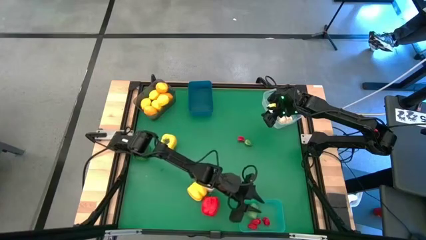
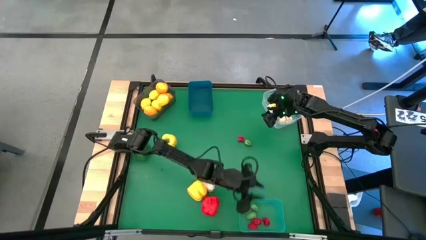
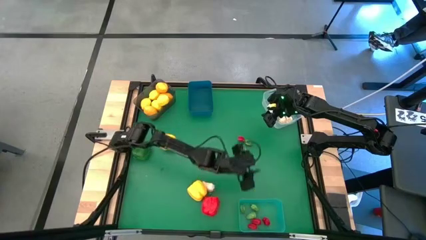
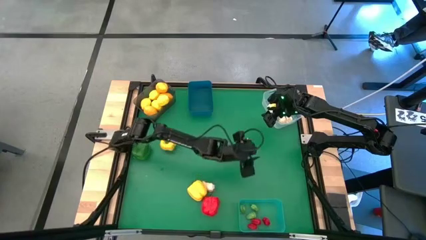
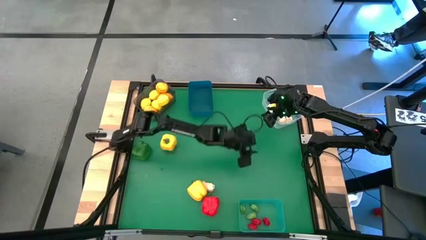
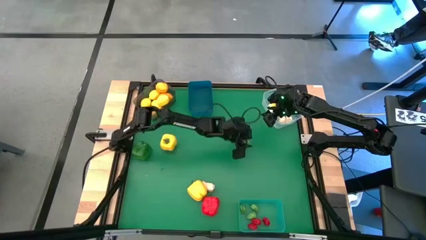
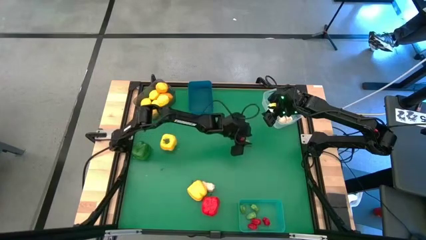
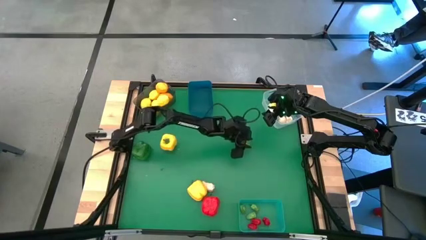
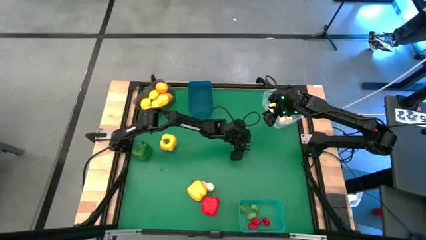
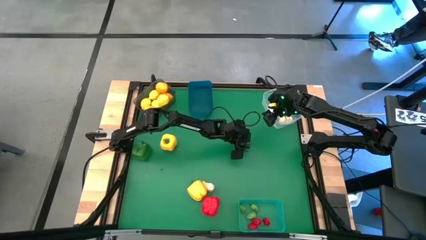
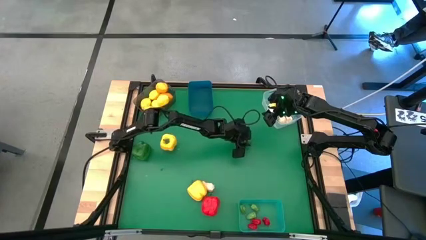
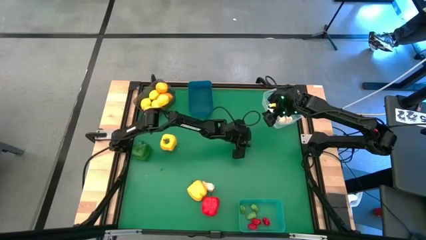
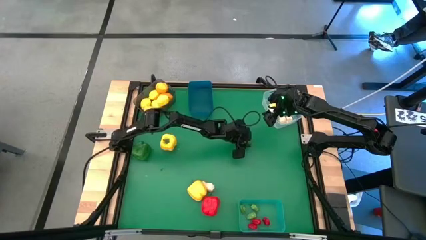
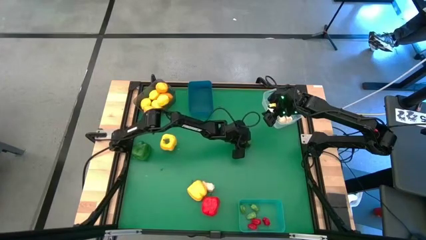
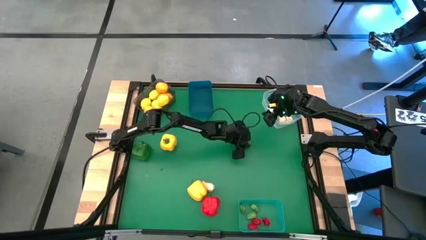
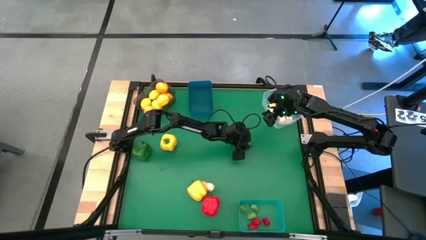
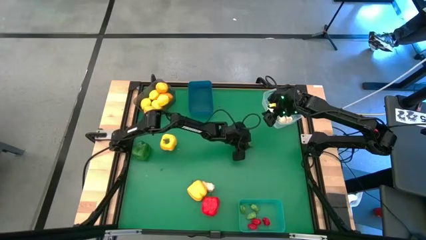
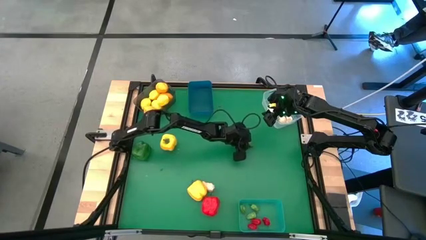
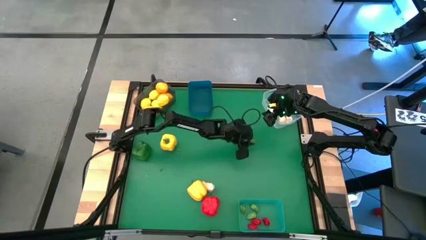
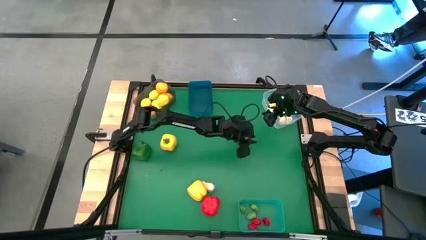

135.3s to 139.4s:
Task: Sort produce into baskets
Put the green pepper into the light blue bin

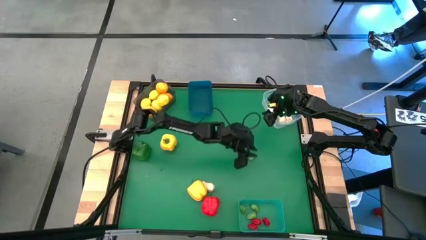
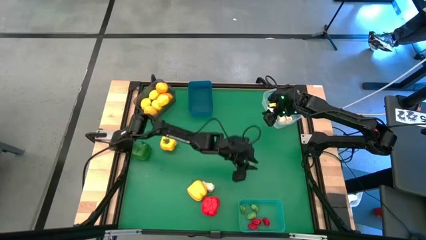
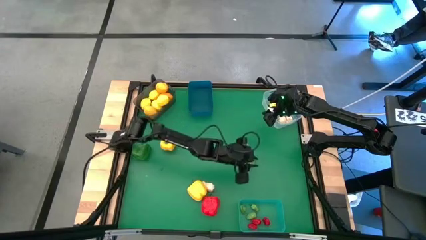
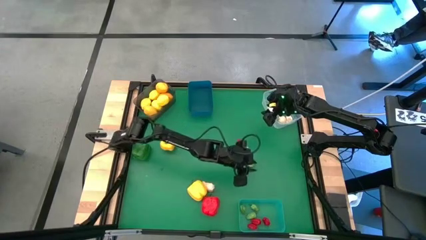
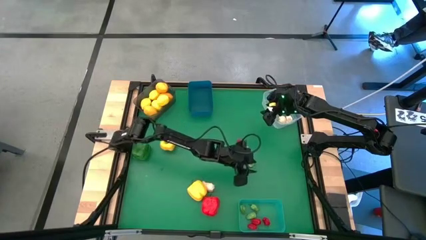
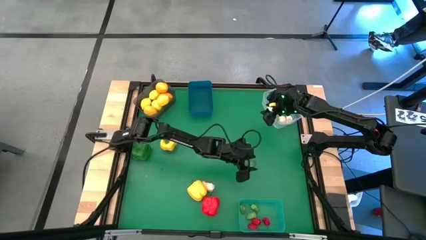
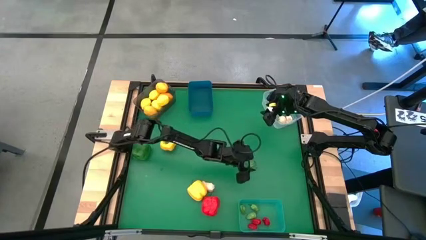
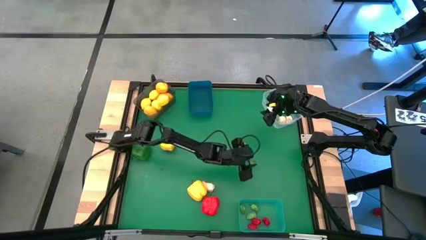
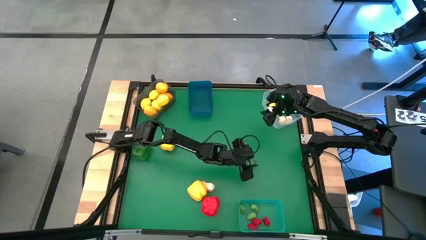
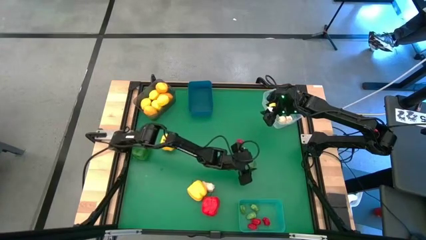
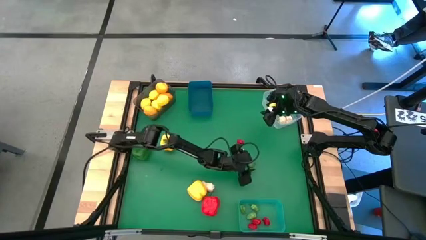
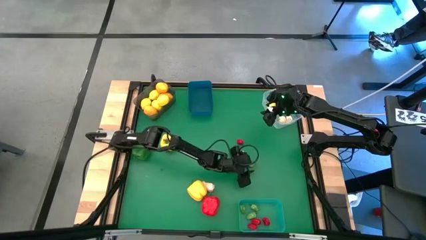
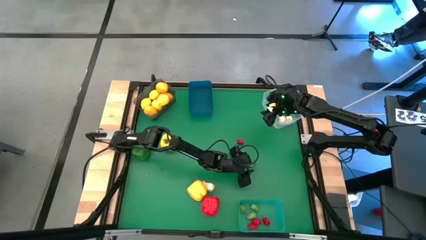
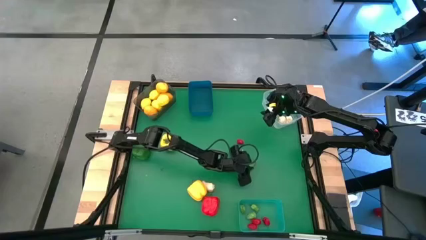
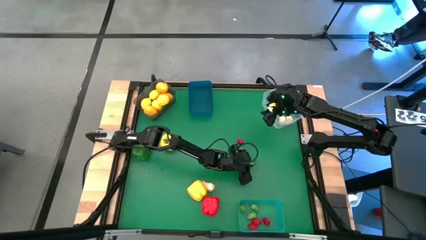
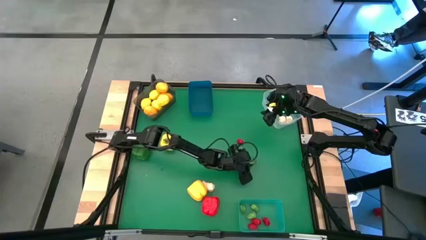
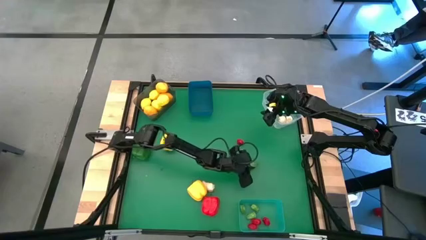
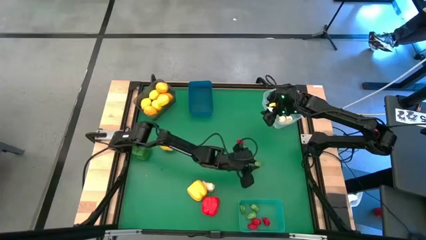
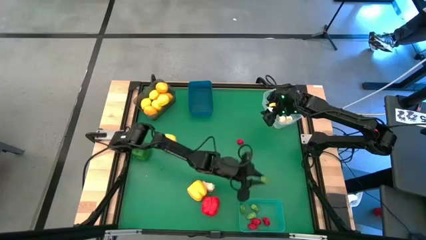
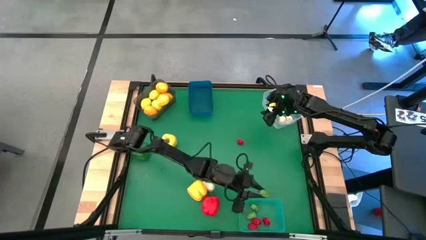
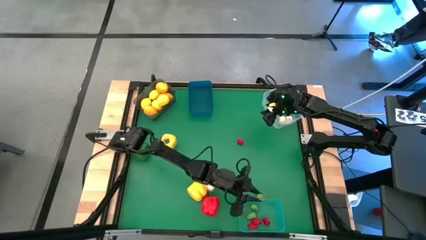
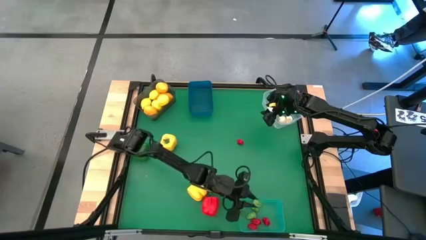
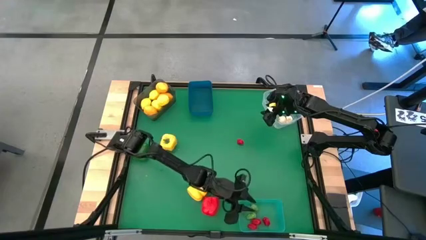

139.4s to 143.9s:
Put the green pepper into the light blue bin

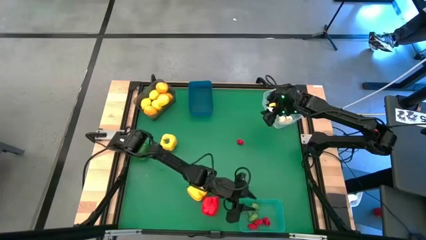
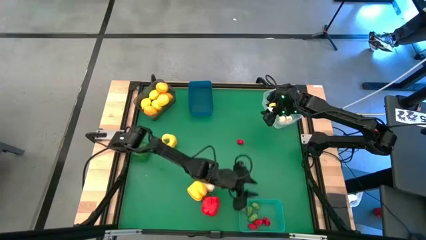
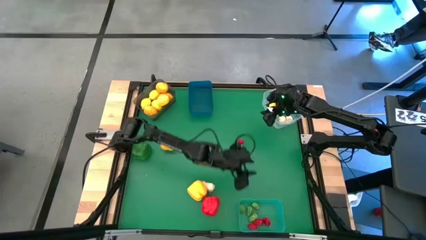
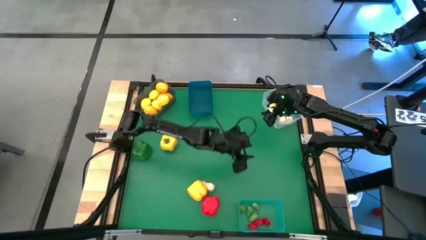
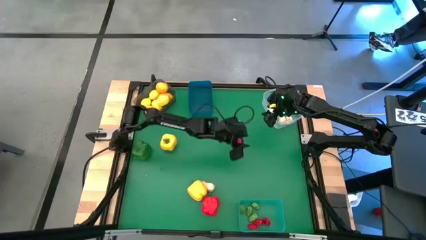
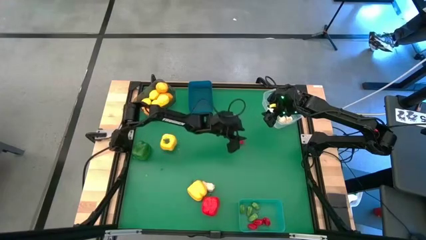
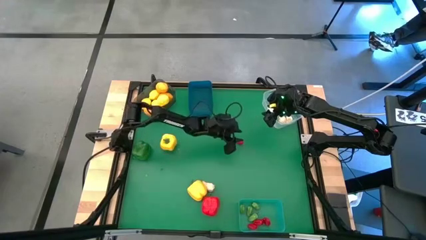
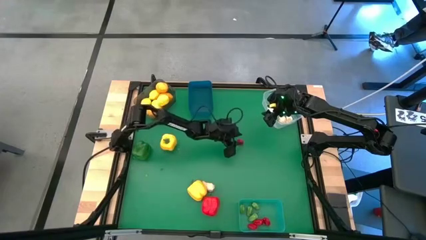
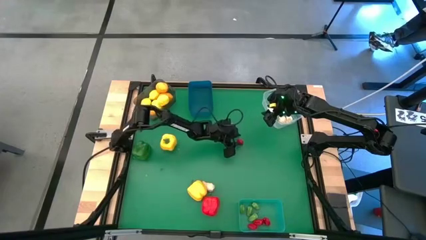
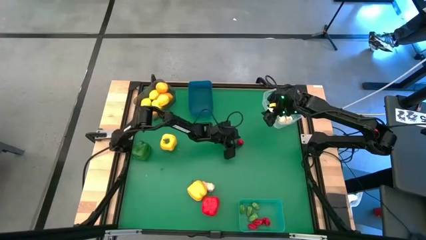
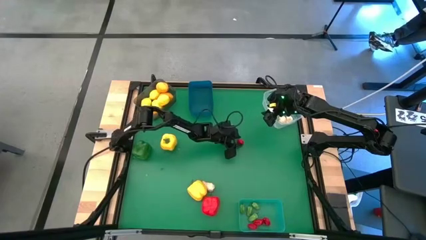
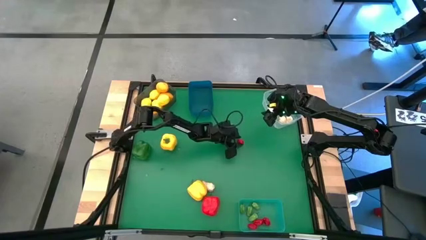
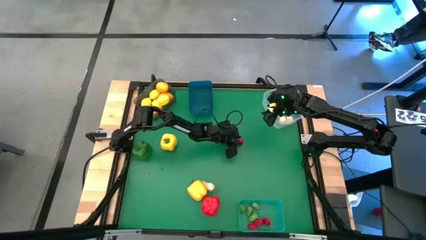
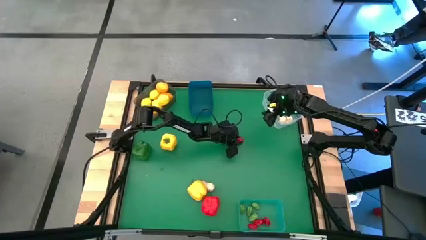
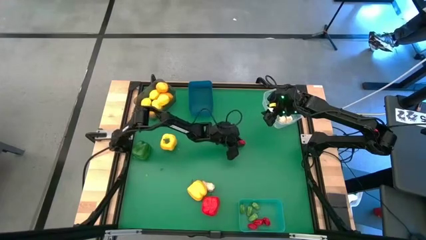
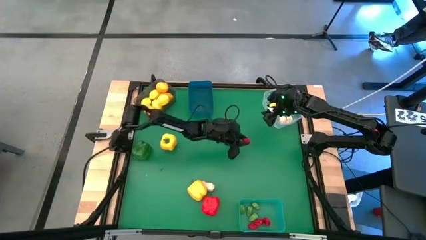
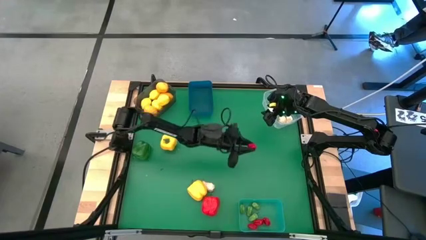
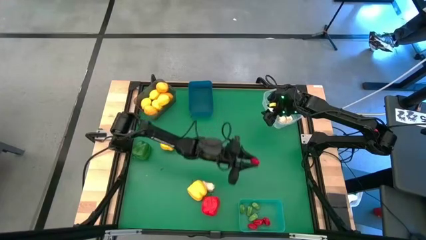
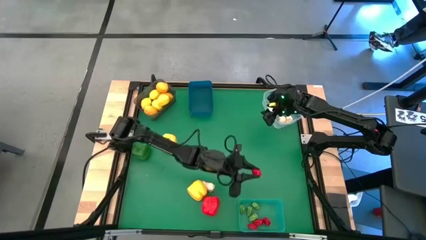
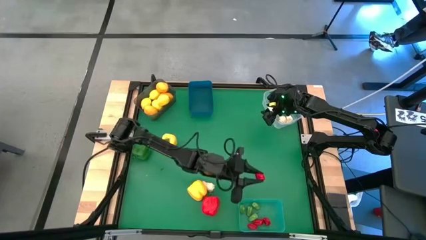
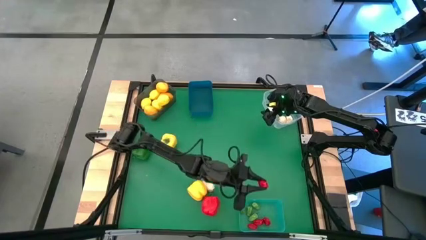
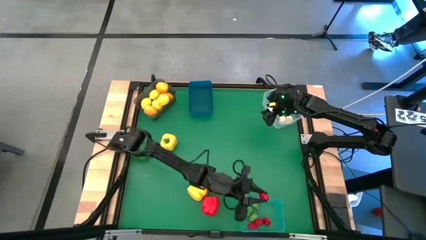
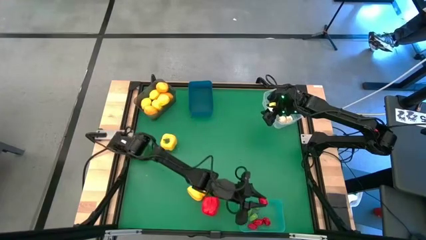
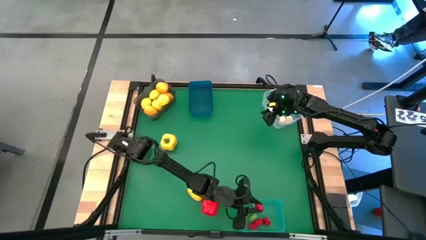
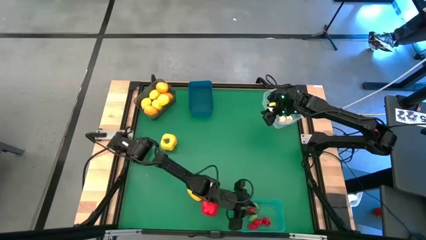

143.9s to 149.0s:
Put the red pepper into the light blue bin

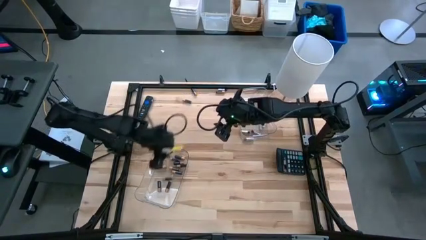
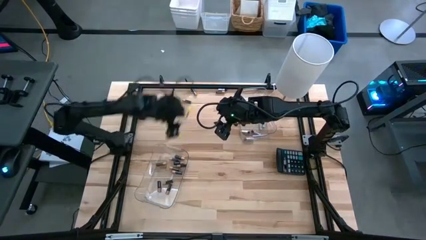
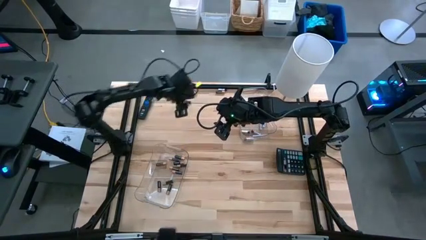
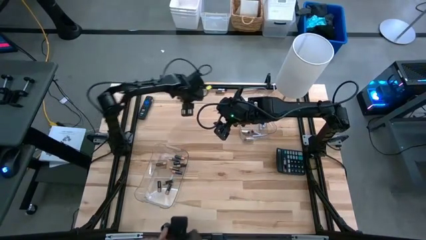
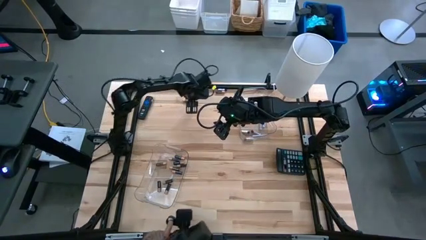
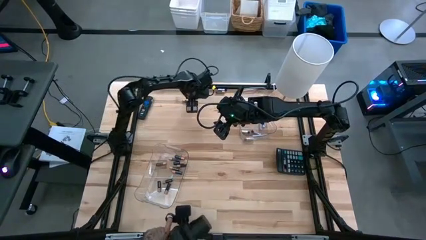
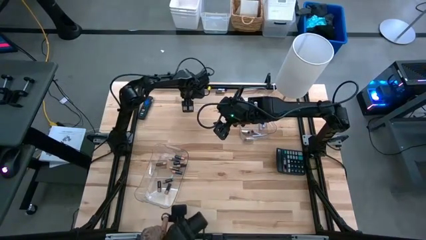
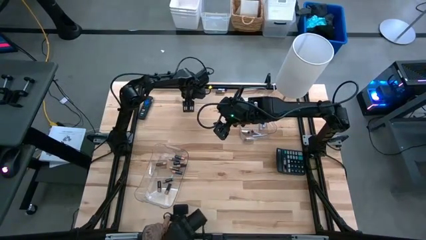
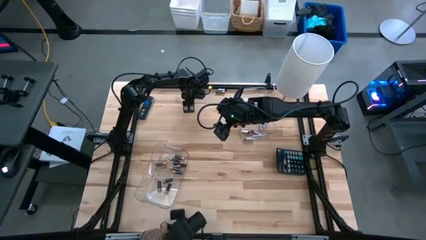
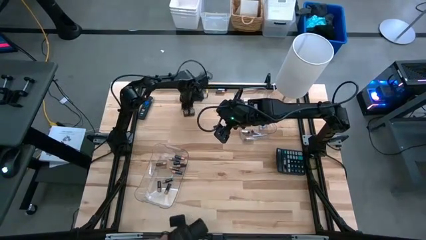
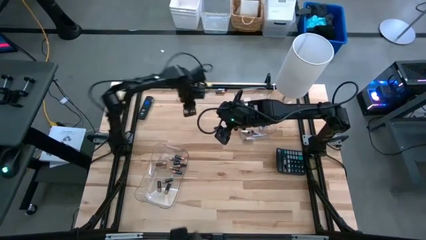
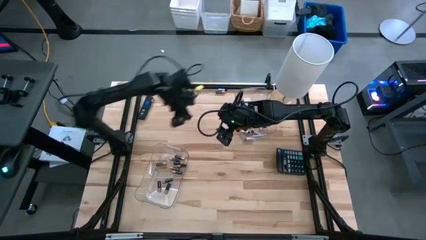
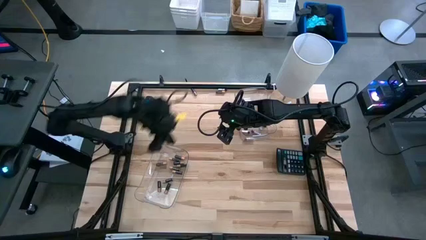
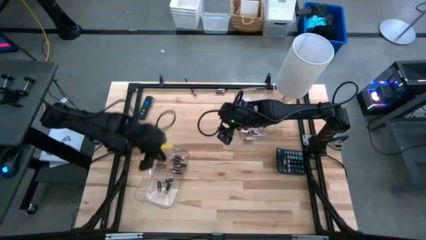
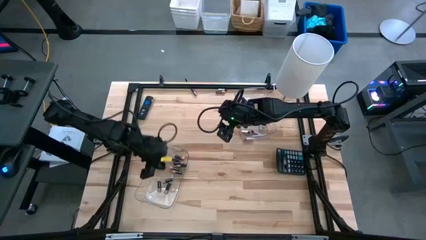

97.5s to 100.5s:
Task: Sort batteries
Put the brown battery into the left transparent bin
